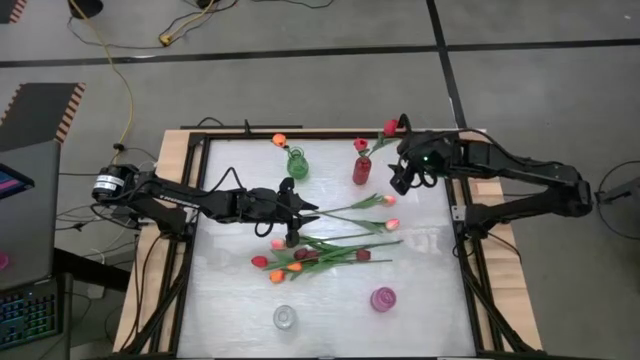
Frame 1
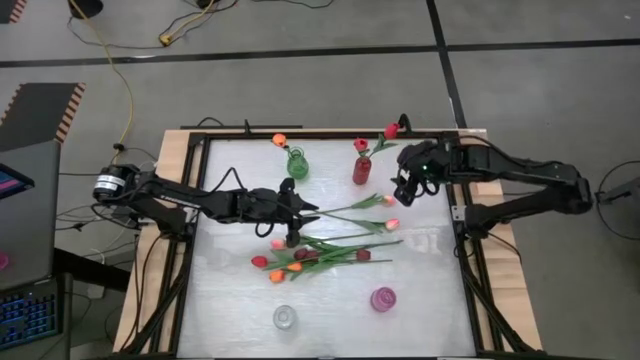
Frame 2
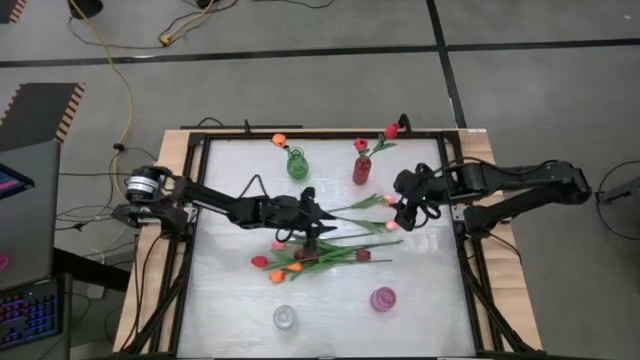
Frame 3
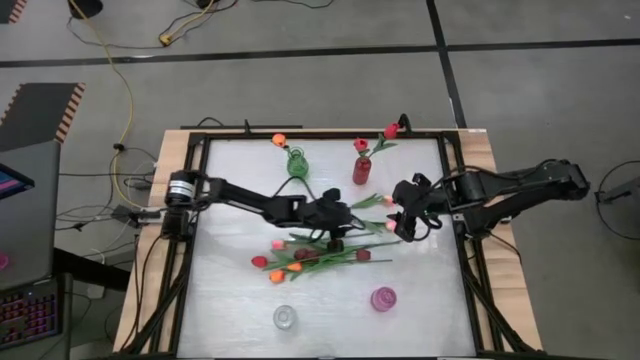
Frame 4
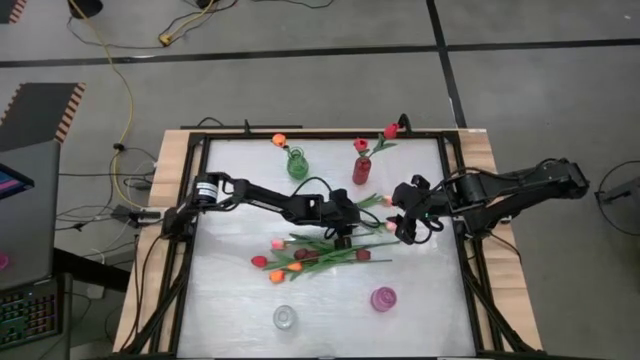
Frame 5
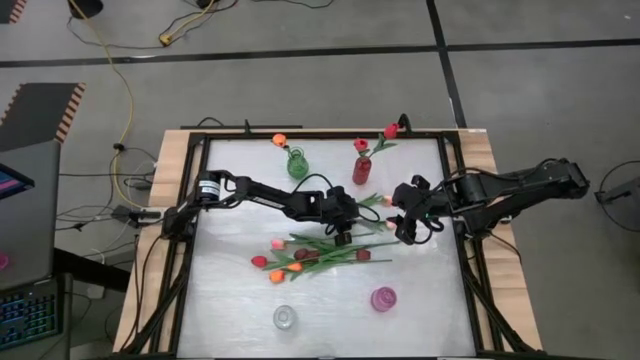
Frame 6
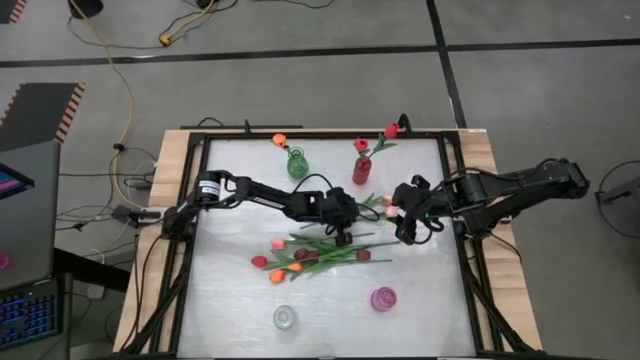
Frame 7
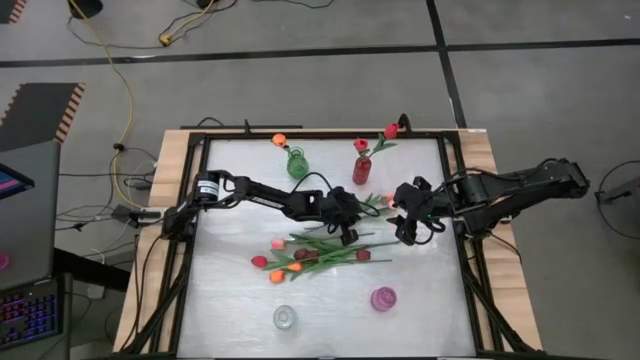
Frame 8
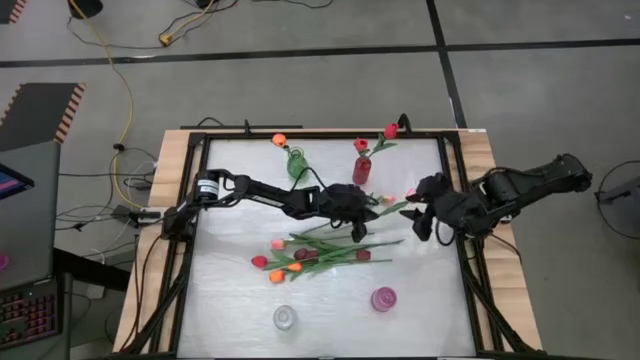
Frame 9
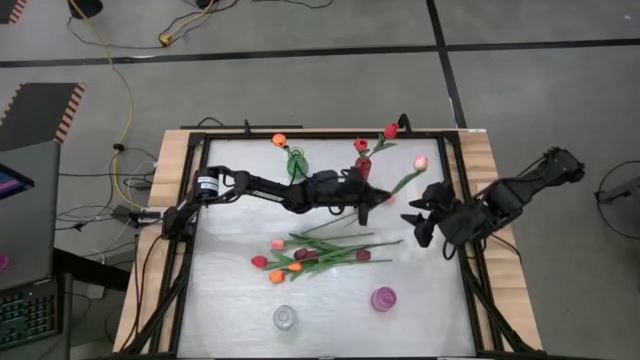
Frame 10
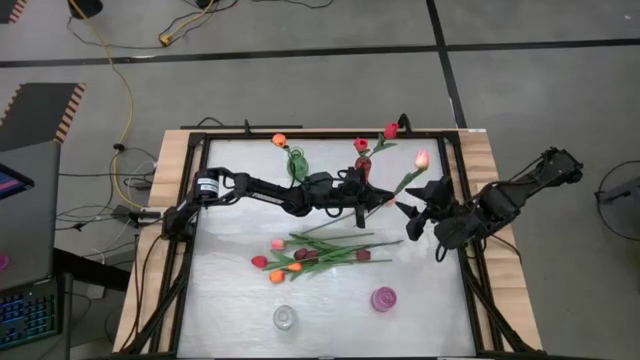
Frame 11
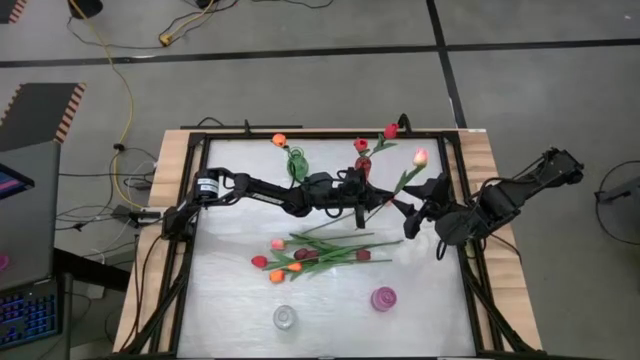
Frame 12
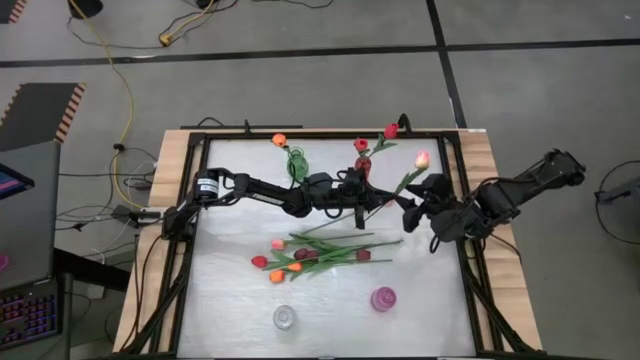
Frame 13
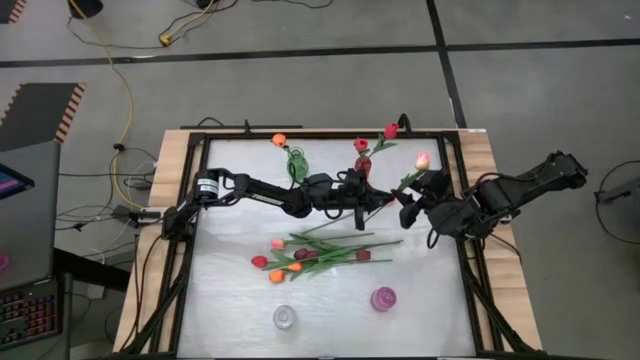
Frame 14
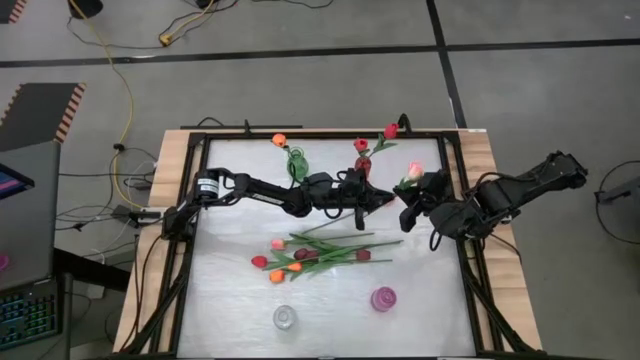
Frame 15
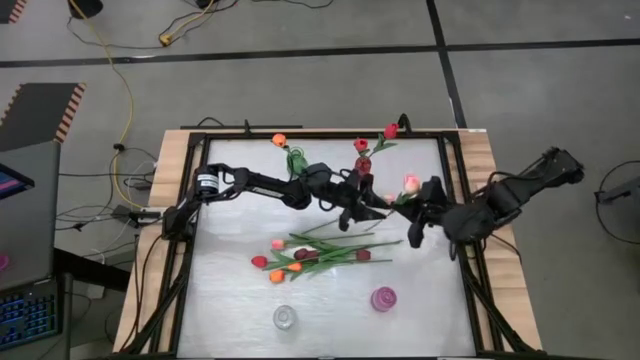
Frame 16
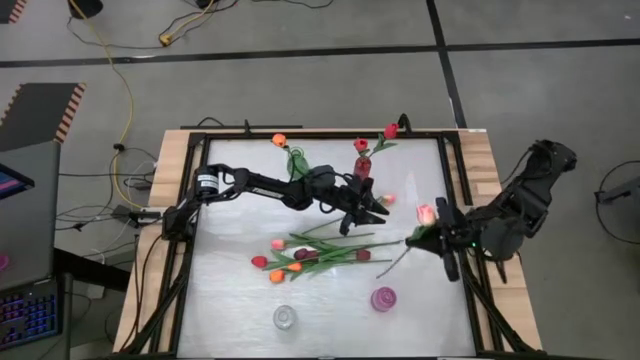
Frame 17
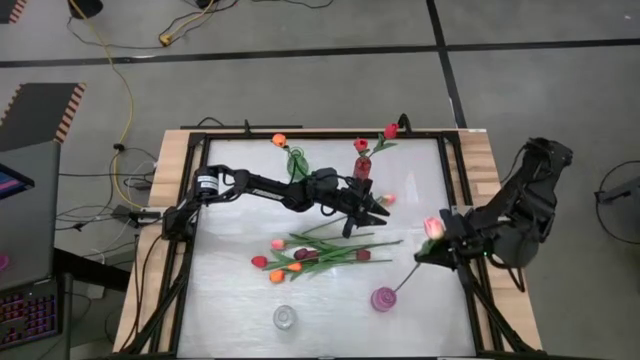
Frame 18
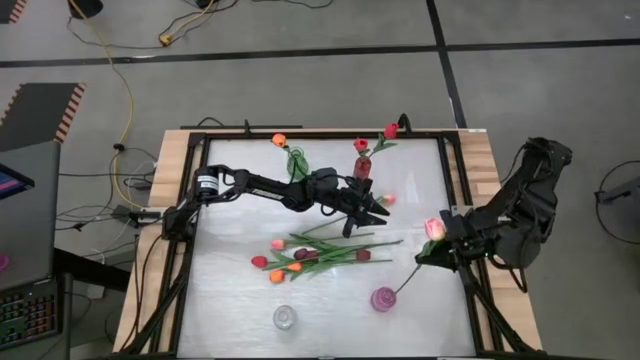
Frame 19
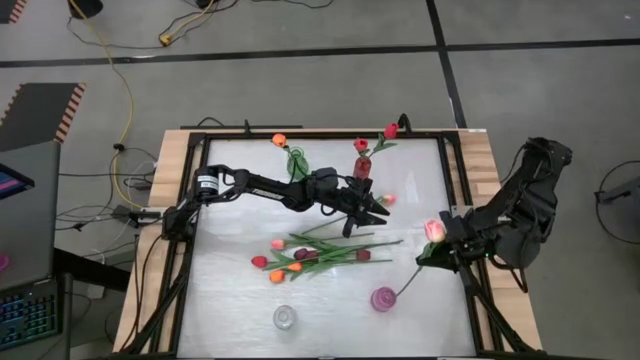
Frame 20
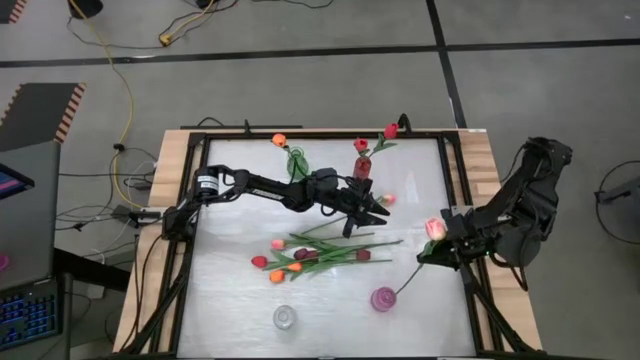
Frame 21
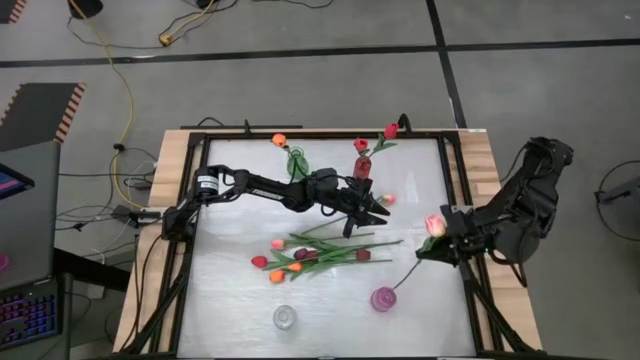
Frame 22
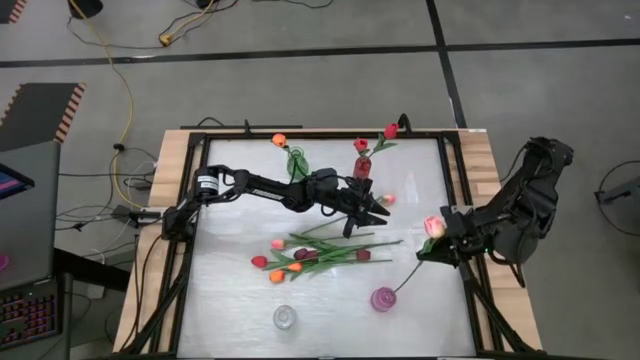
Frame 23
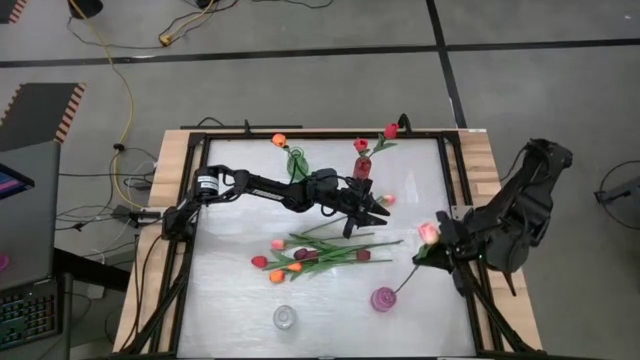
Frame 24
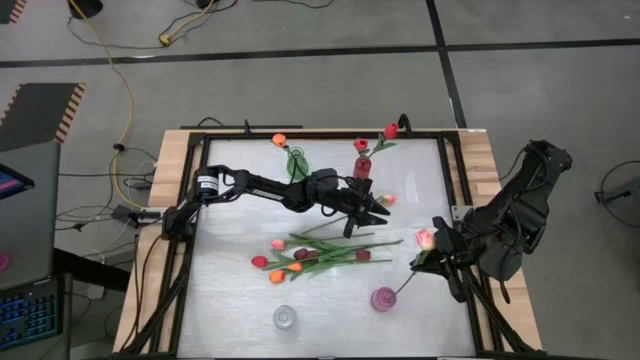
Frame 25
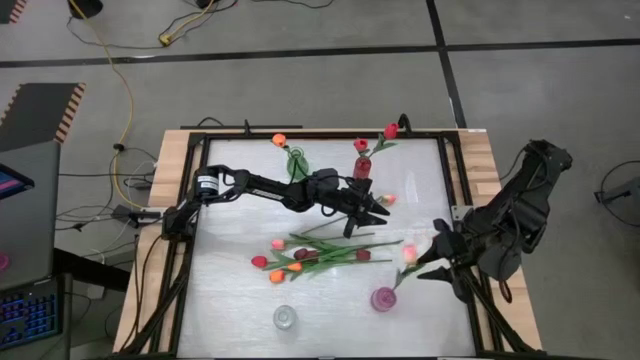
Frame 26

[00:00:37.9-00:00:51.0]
Task: Sort flowers into vase by color
Put the pink flower into the purple vase

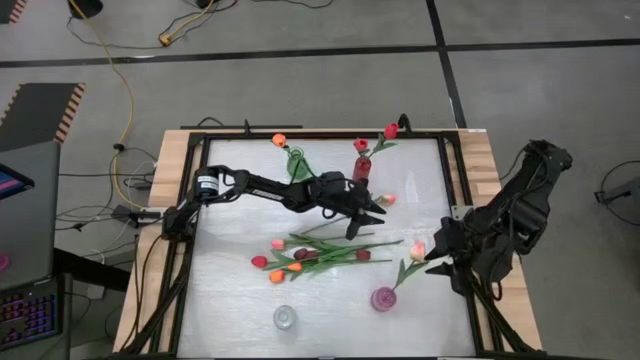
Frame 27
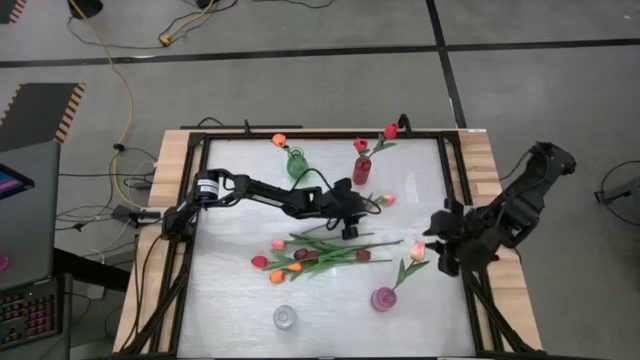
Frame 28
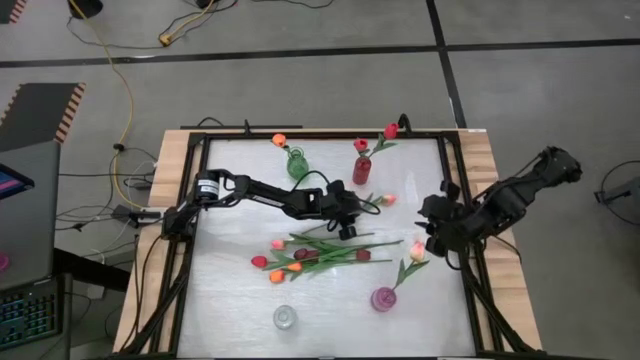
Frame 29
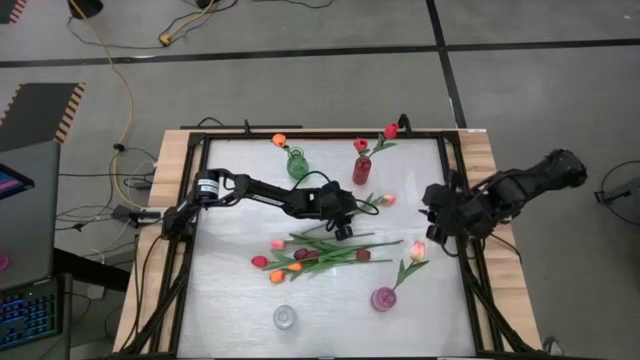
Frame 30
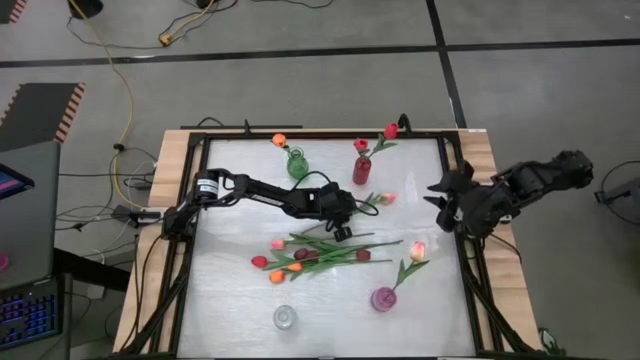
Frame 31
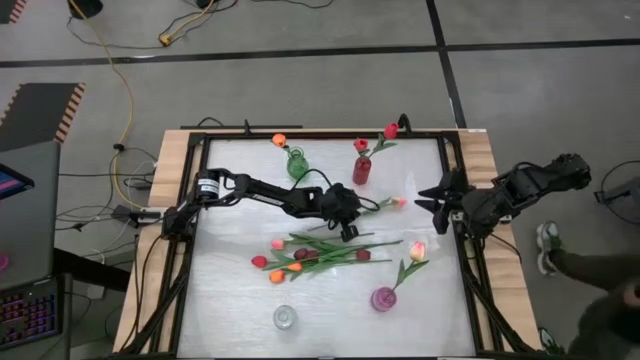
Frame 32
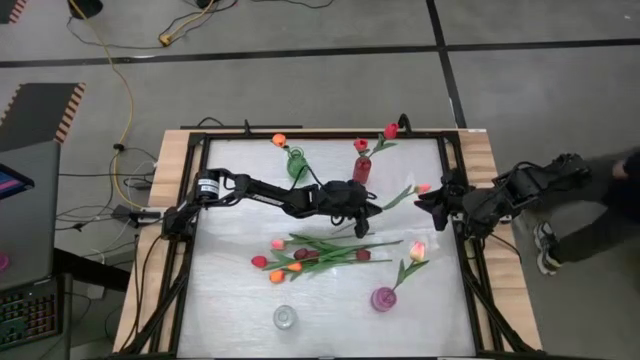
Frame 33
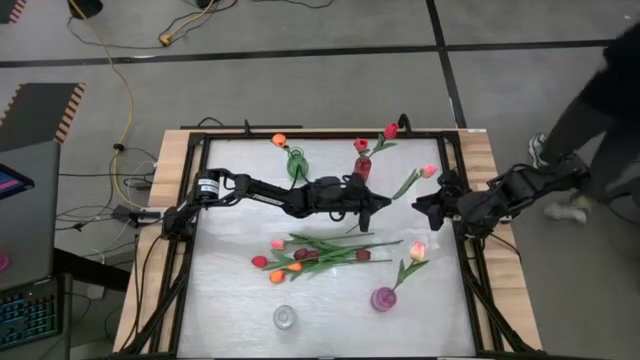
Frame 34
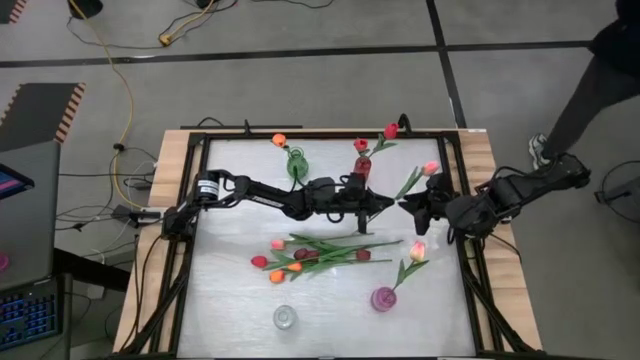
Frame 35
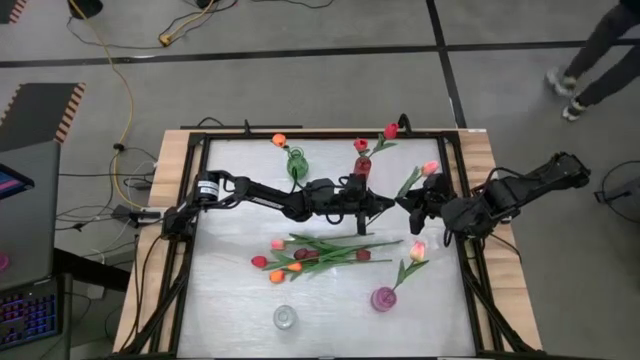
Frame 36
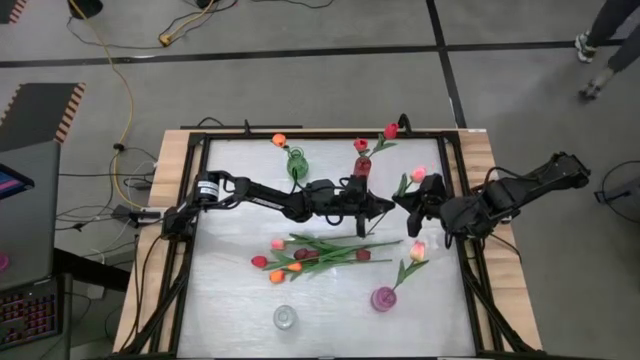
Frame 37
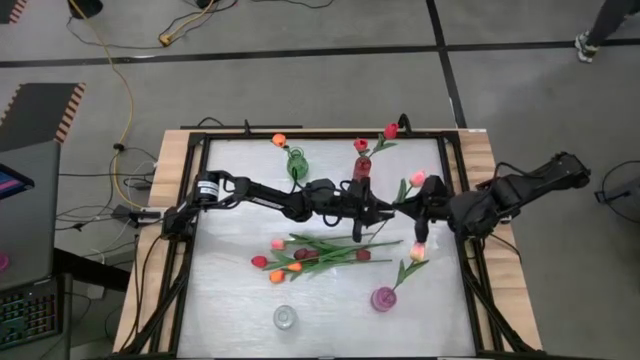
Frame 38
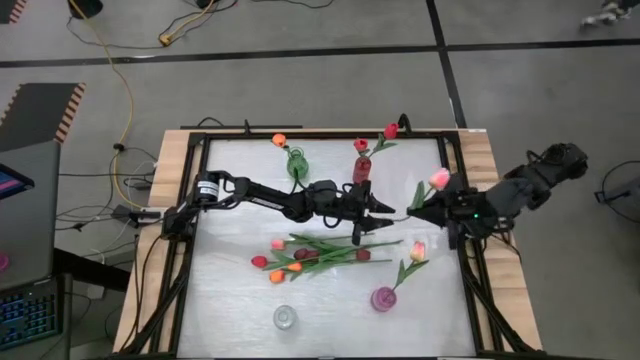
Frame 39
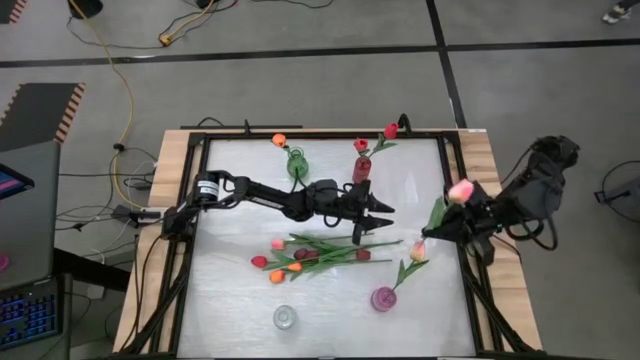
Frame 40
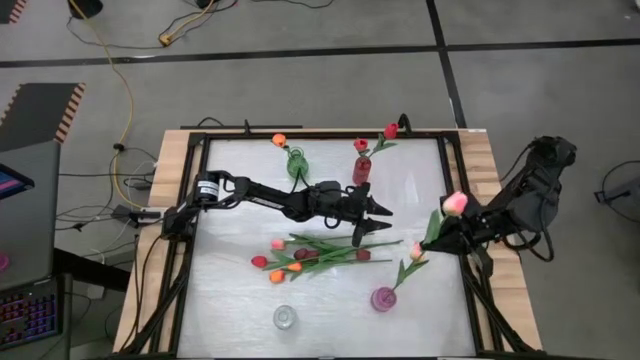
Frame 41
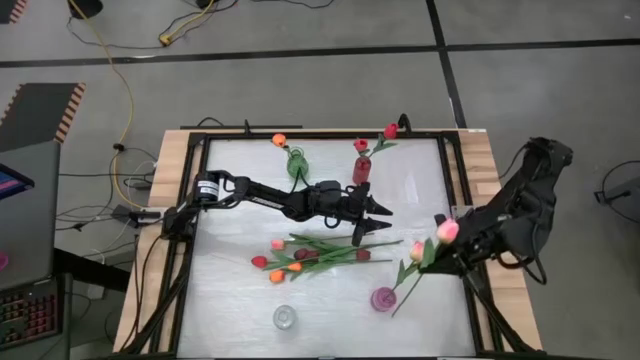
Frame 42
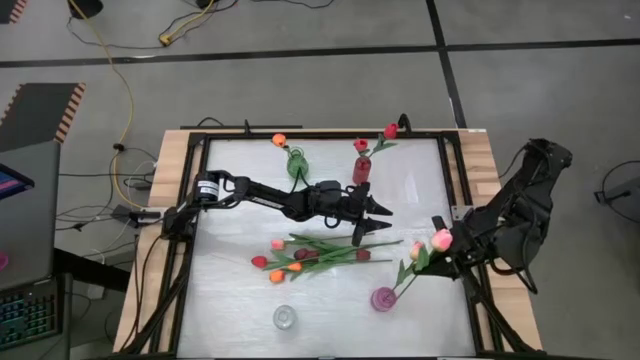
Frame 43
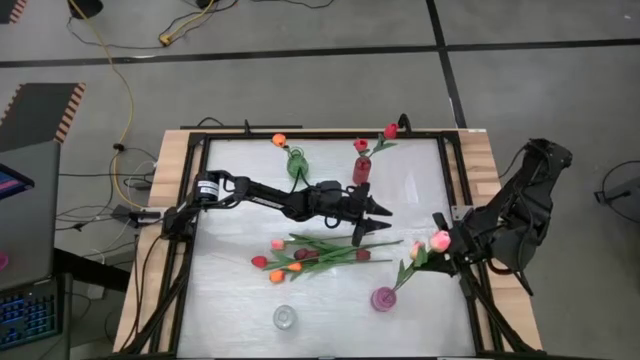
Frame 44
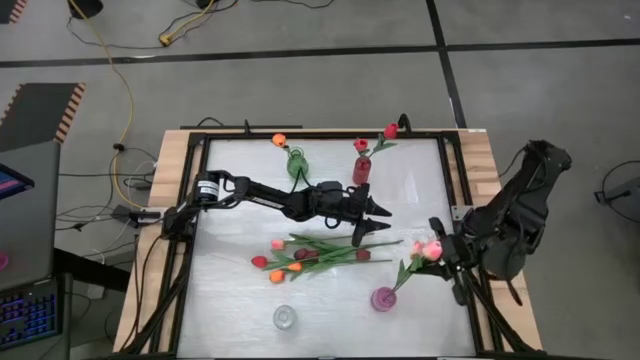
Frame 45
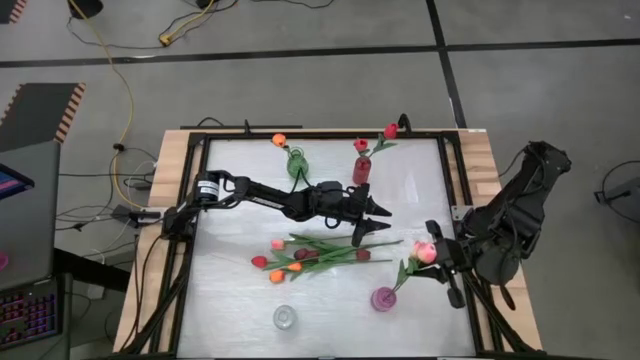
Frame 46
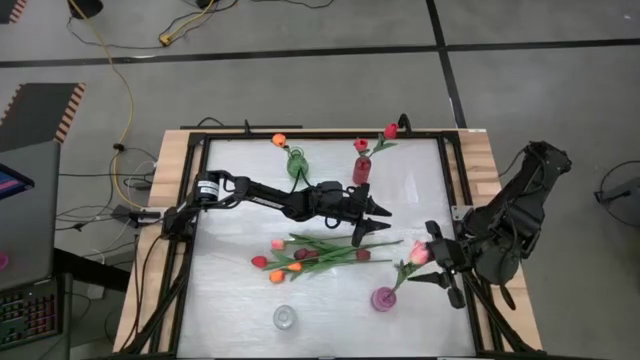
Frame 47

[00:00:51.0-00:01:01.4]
Put the pink flower into the purple vase
